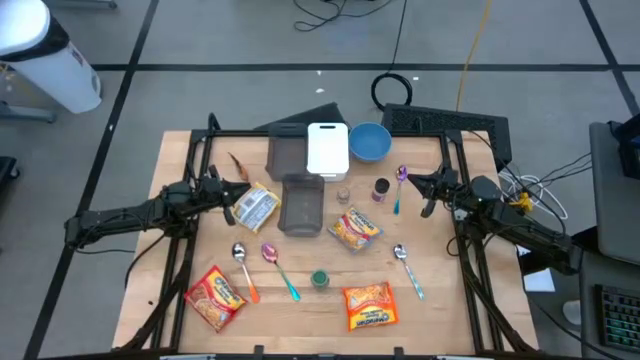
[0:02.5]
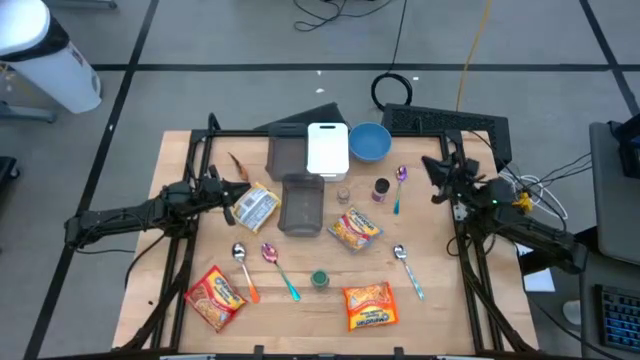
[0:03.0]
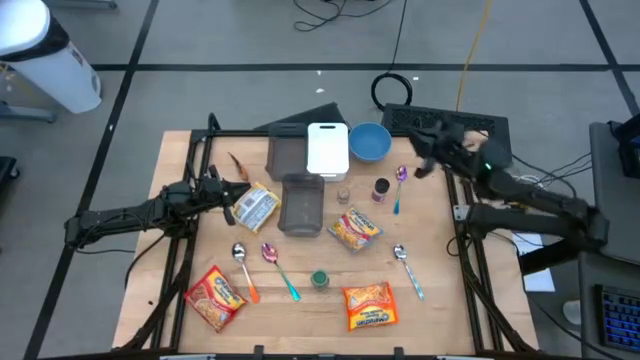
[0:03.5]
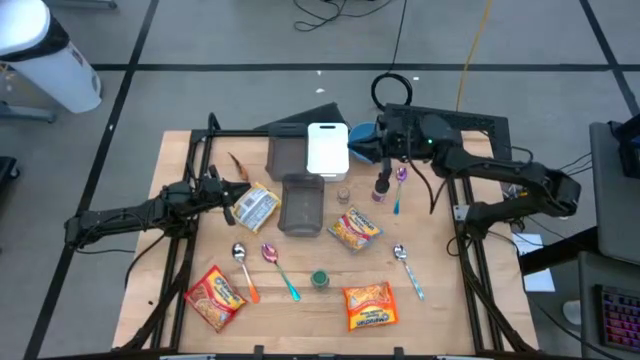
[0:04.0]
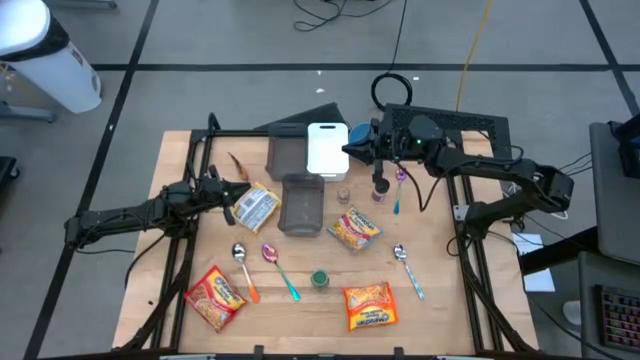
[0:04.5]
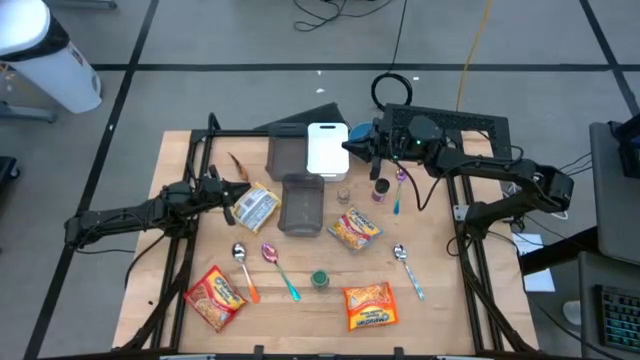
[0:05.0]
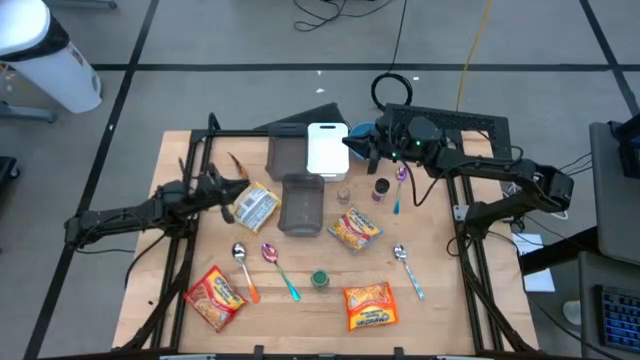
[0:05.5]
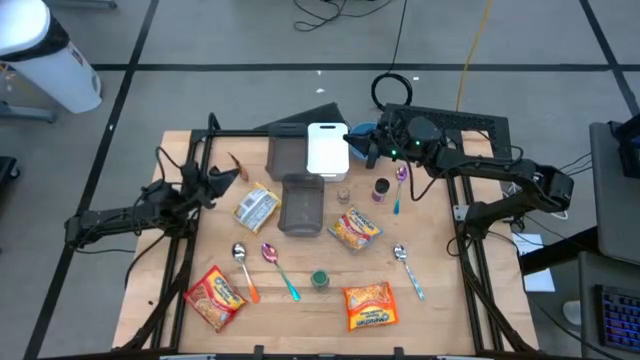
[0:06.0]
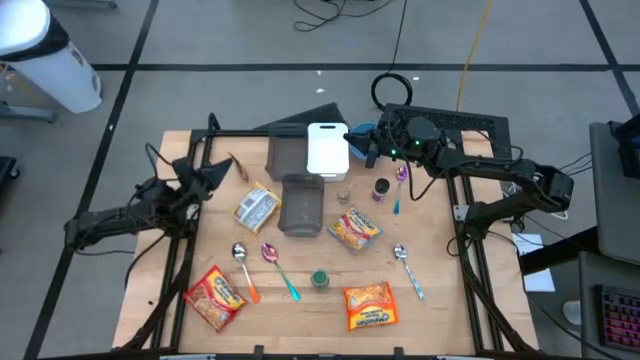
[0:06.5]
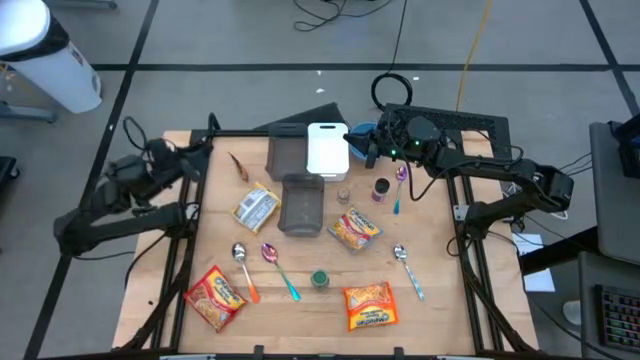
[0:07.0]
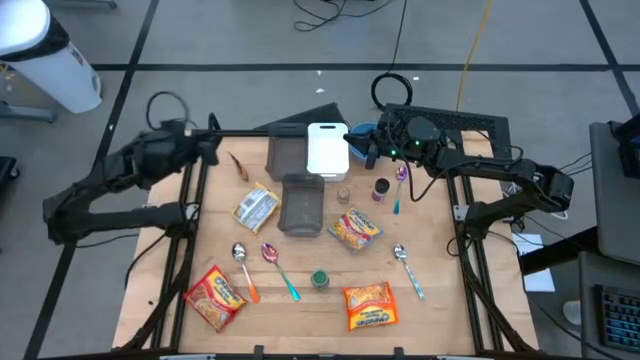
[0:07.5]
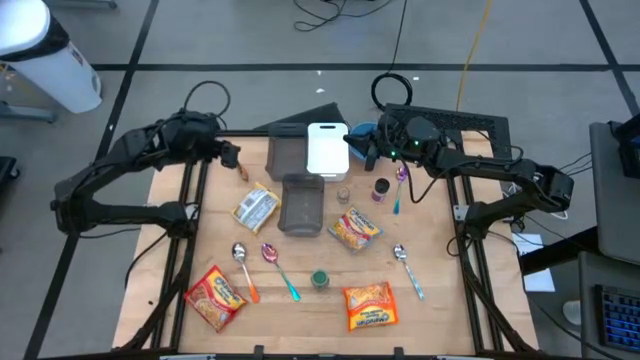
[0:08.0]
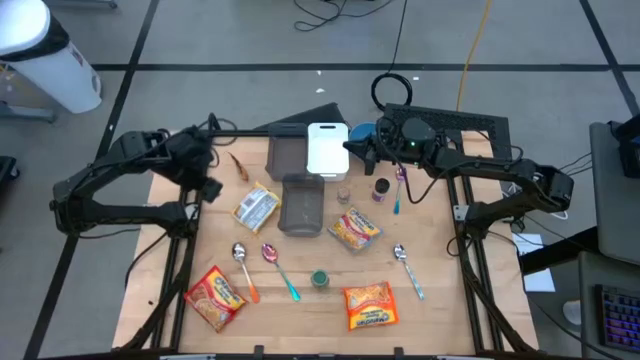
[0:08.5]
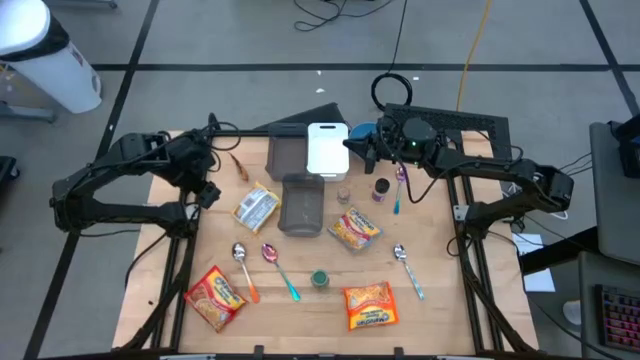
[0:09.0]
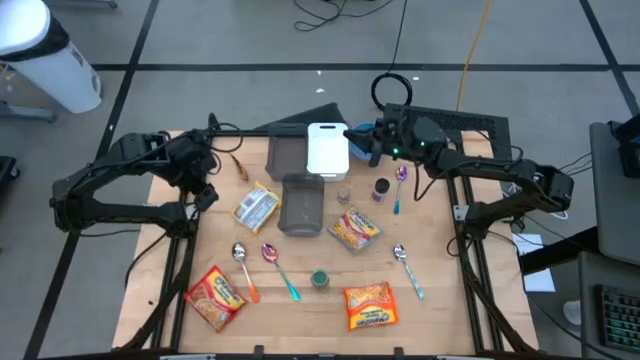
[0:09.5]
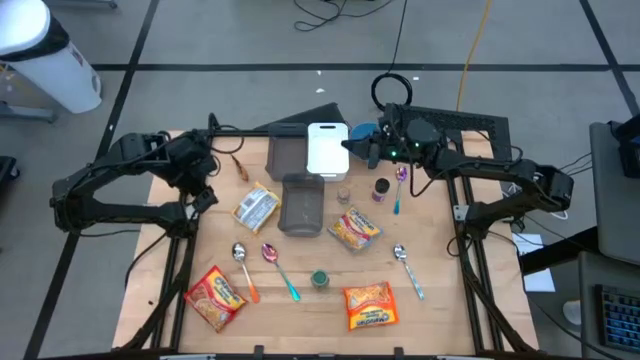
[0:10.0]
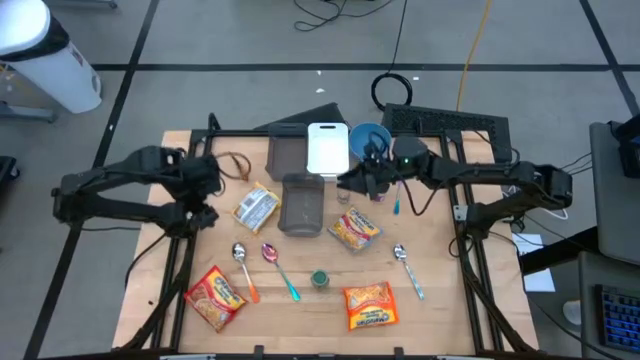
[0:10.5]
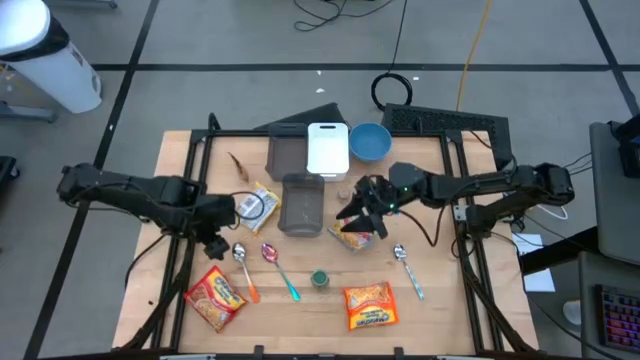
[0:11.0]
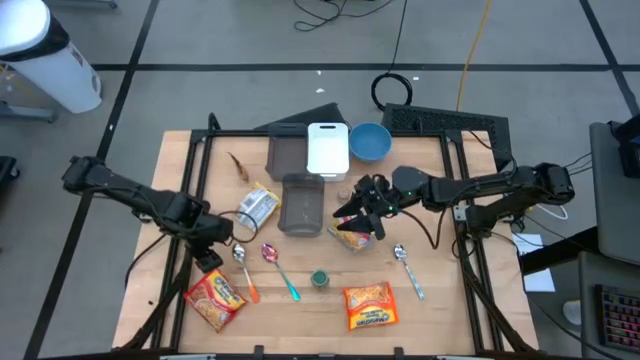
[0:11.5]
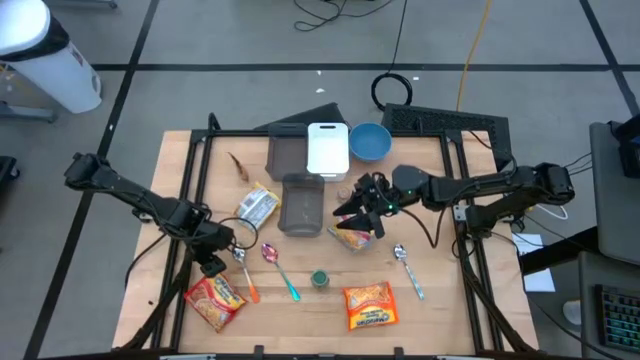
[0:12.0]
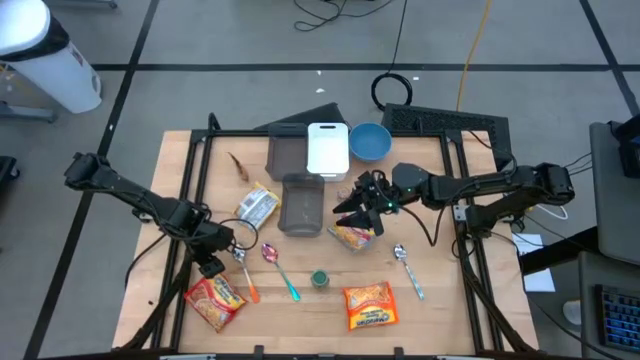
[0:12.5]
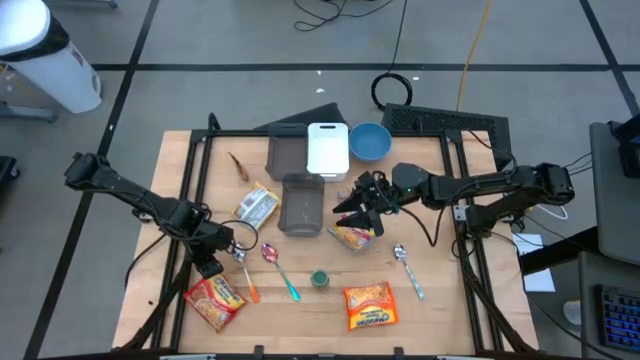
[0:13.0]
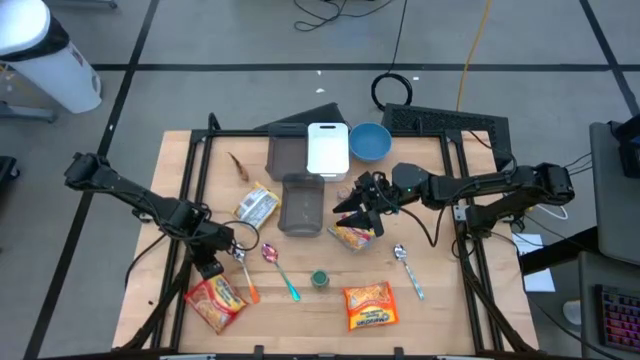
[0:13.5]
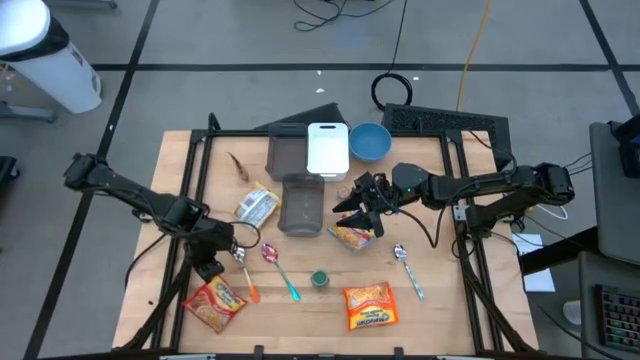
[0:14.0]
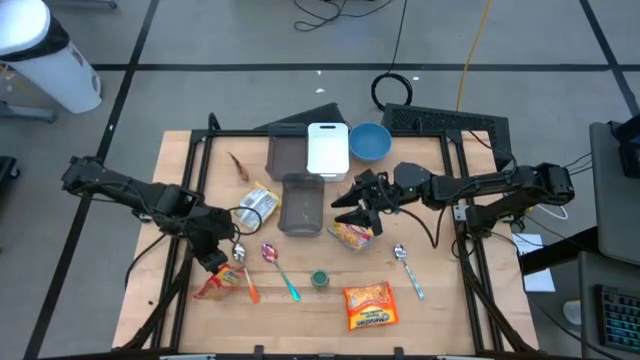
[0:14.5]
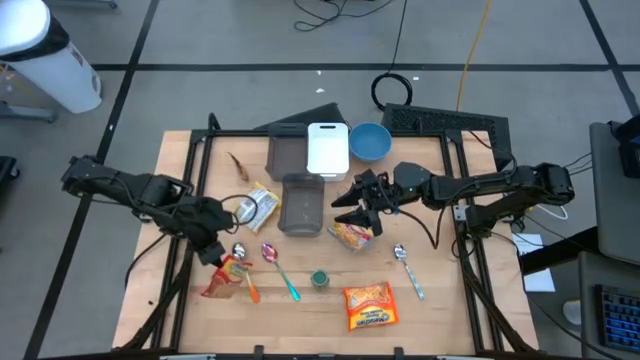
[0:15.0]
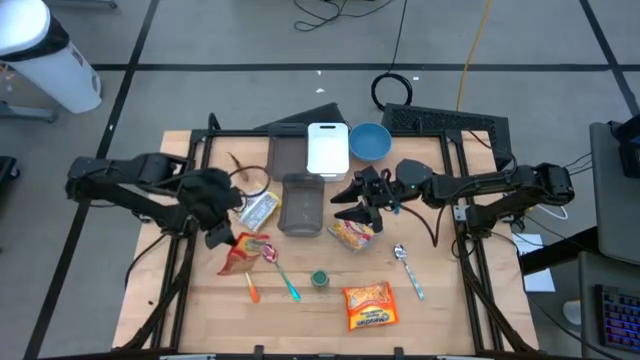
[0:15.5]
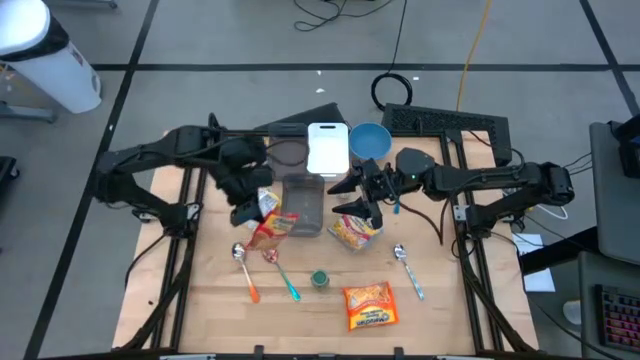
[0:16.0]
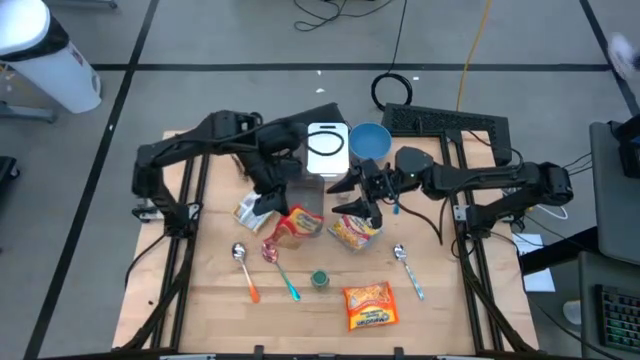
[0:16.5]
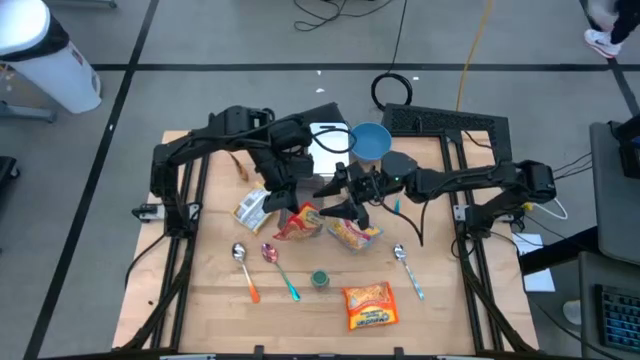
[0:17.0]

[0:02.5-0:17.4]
Task: Pick & Place Food Item
Put the red noodle pack into the bottom black bin
